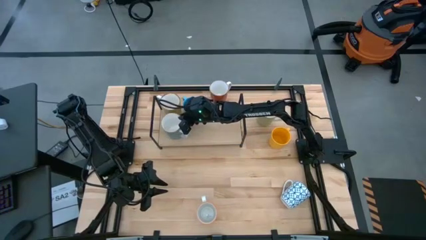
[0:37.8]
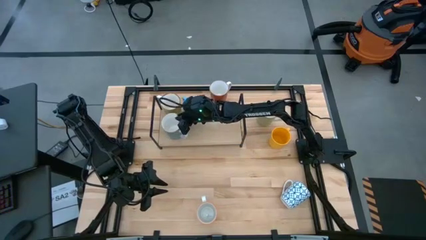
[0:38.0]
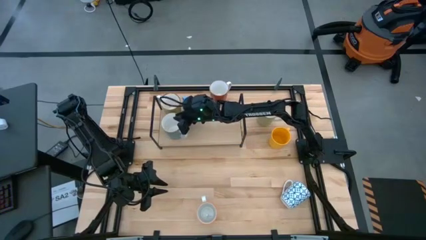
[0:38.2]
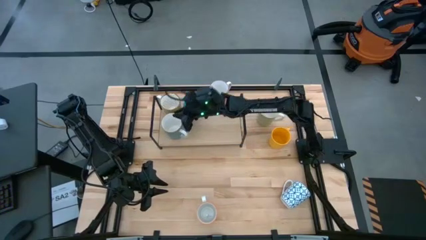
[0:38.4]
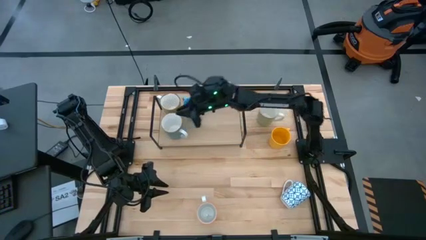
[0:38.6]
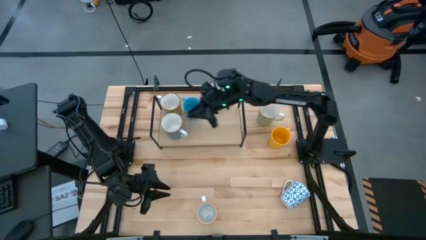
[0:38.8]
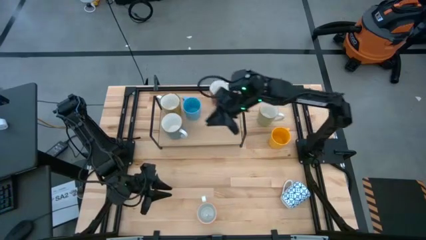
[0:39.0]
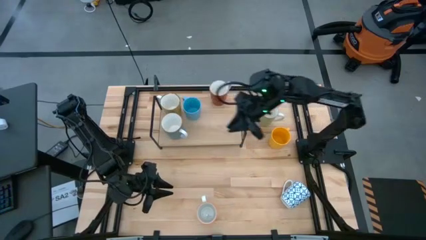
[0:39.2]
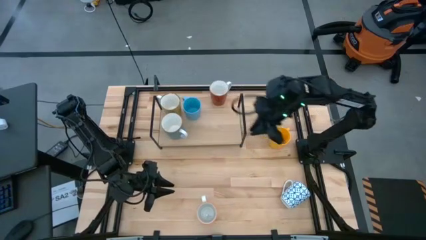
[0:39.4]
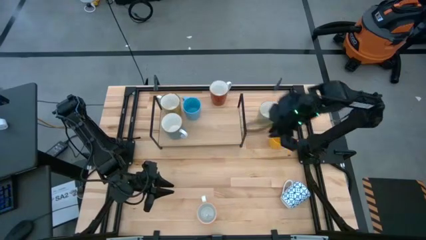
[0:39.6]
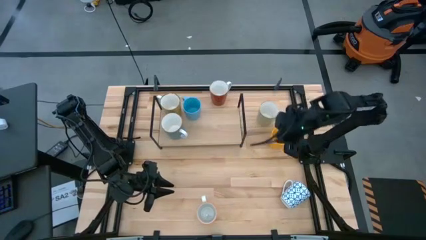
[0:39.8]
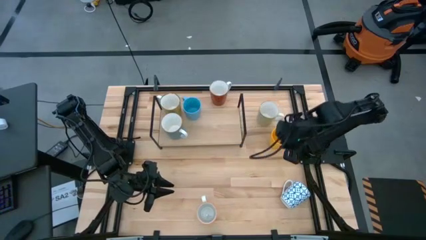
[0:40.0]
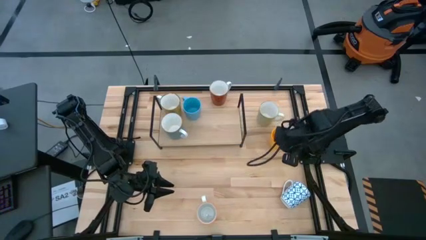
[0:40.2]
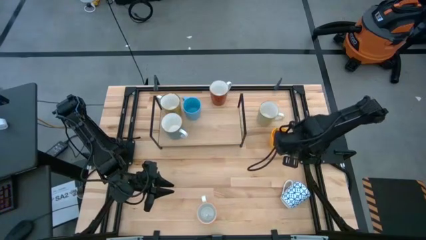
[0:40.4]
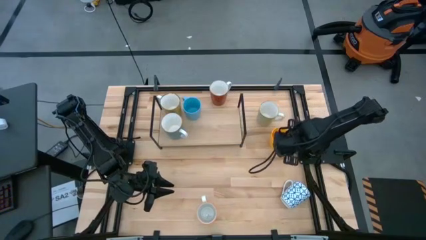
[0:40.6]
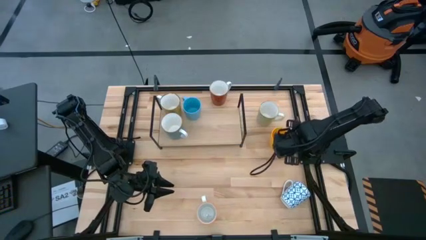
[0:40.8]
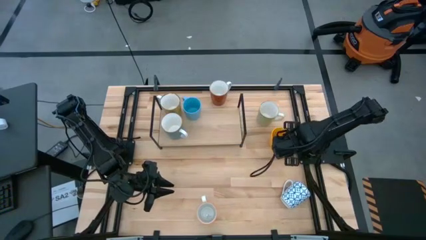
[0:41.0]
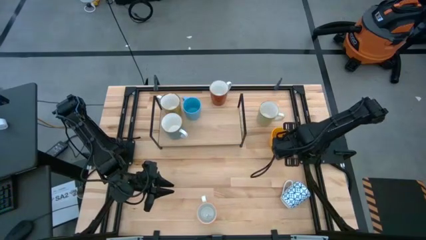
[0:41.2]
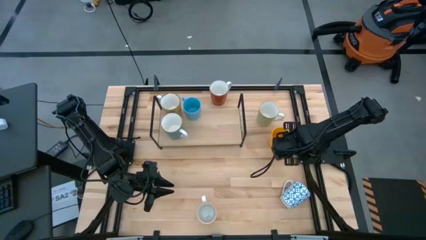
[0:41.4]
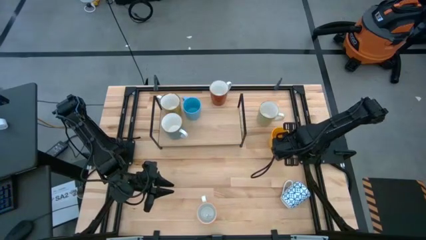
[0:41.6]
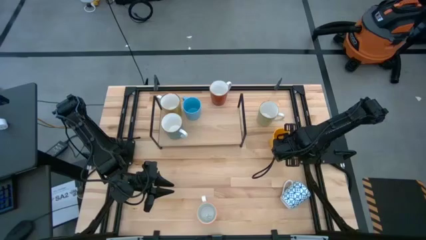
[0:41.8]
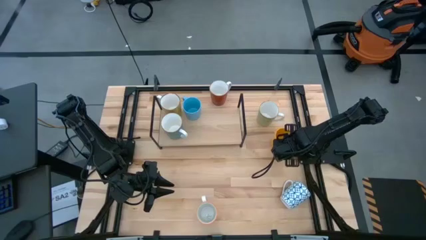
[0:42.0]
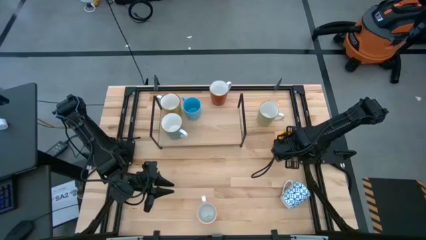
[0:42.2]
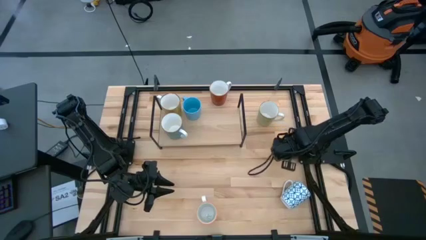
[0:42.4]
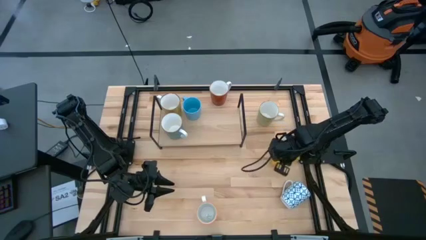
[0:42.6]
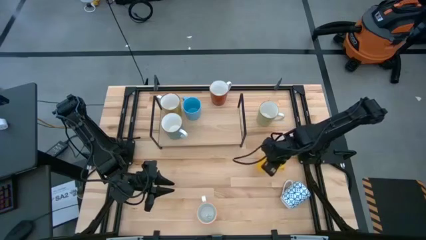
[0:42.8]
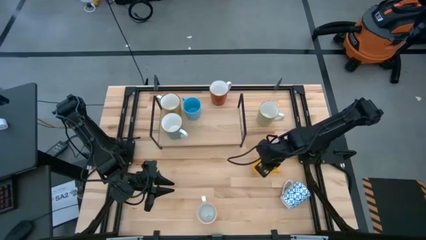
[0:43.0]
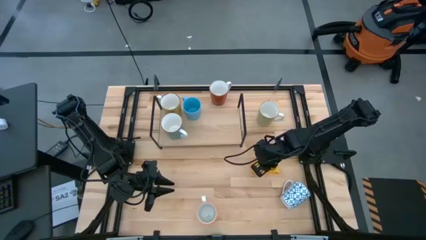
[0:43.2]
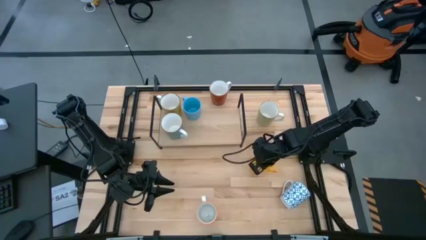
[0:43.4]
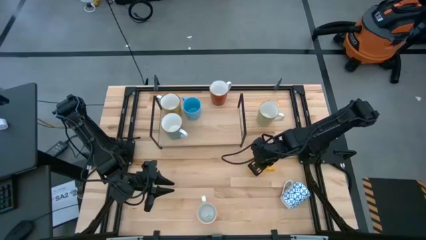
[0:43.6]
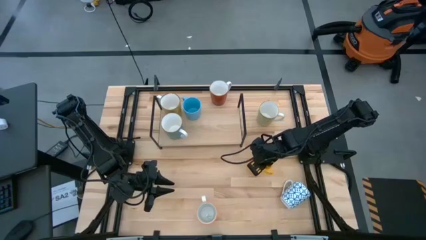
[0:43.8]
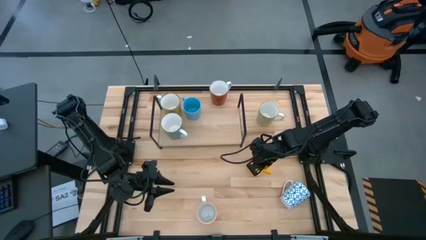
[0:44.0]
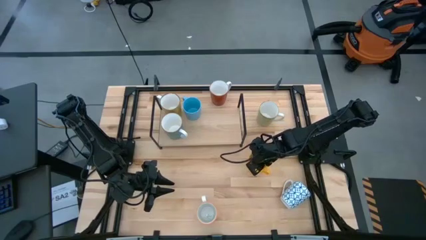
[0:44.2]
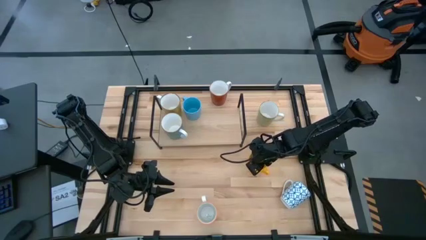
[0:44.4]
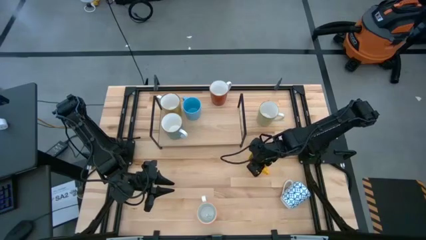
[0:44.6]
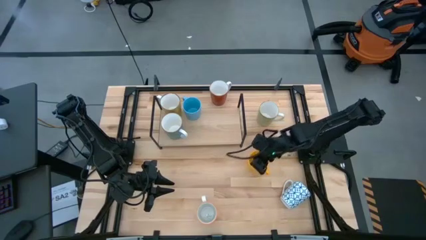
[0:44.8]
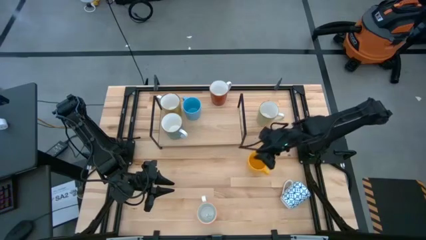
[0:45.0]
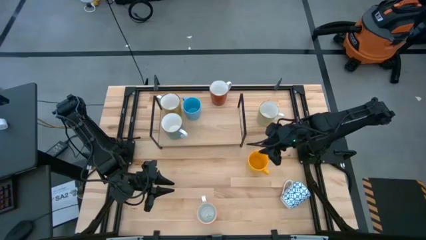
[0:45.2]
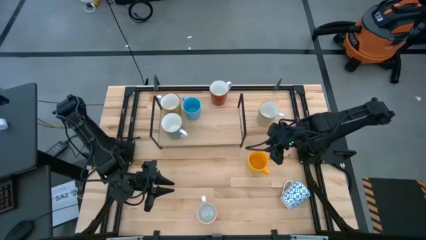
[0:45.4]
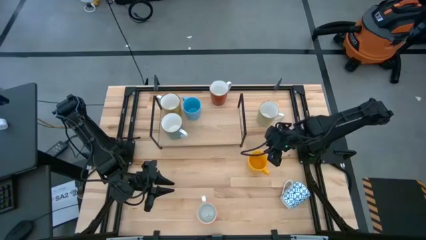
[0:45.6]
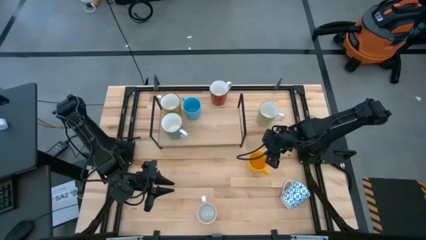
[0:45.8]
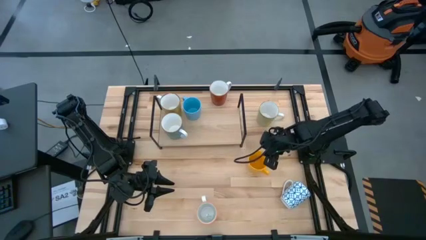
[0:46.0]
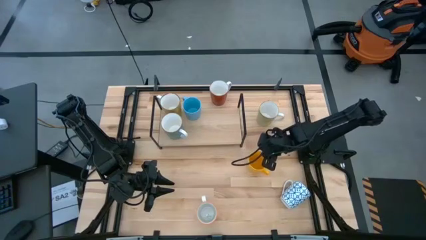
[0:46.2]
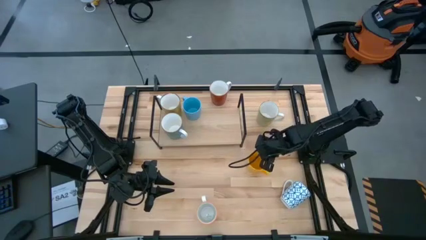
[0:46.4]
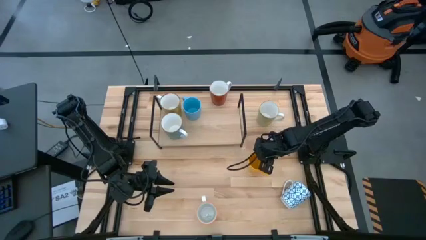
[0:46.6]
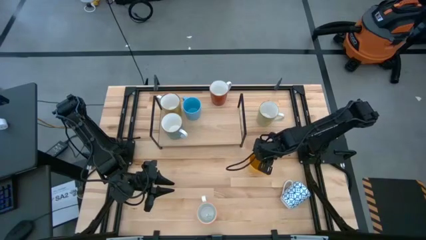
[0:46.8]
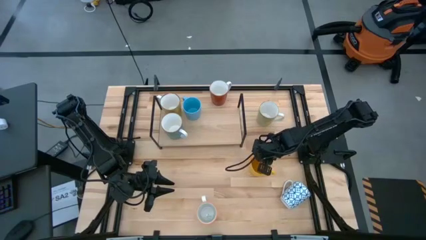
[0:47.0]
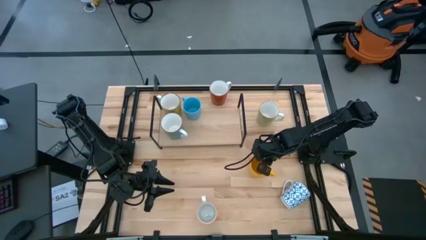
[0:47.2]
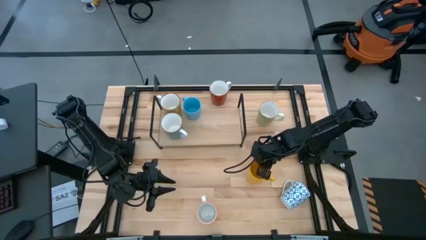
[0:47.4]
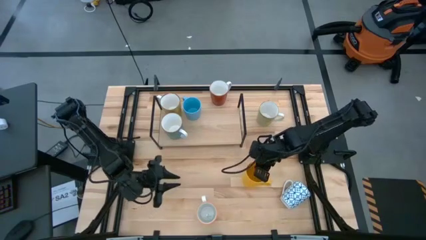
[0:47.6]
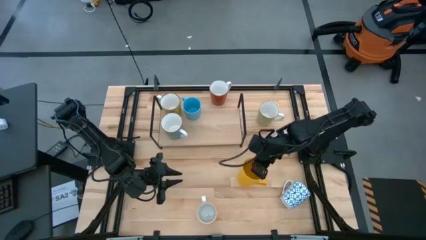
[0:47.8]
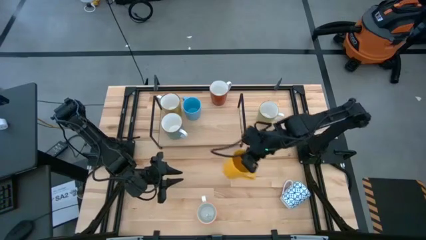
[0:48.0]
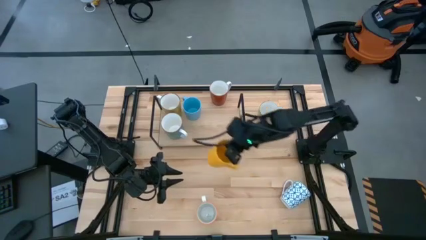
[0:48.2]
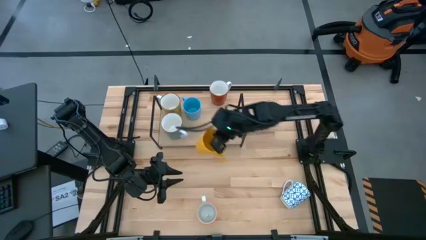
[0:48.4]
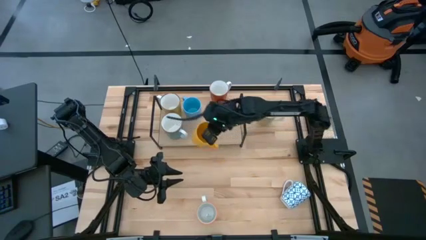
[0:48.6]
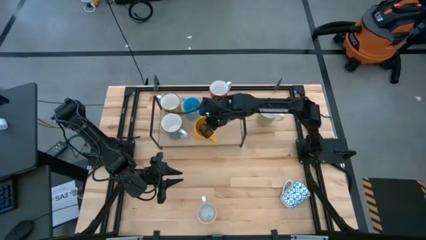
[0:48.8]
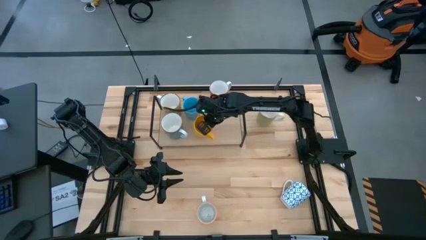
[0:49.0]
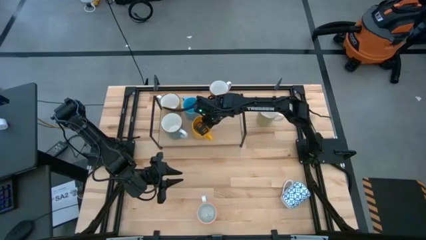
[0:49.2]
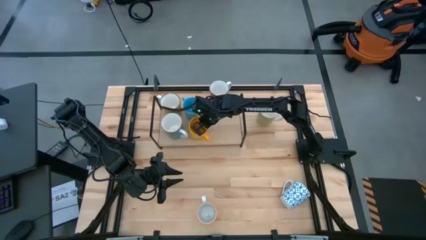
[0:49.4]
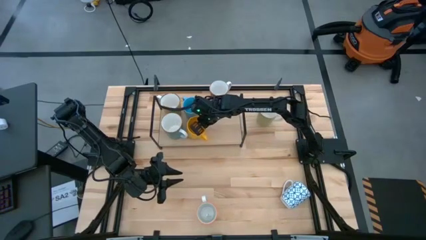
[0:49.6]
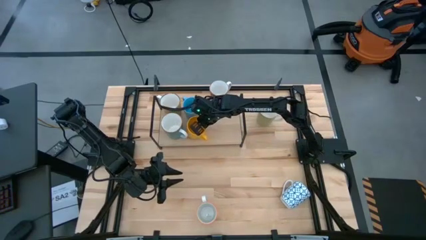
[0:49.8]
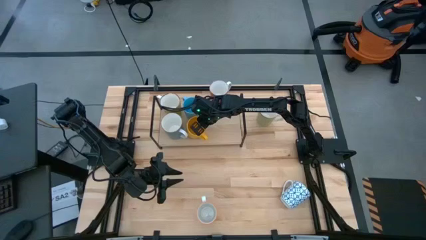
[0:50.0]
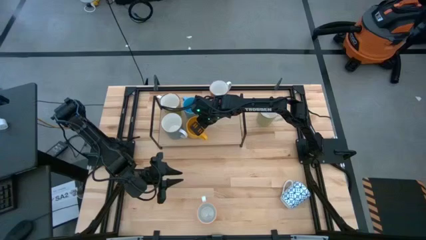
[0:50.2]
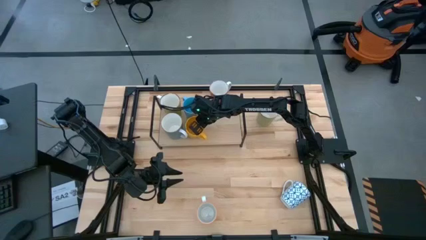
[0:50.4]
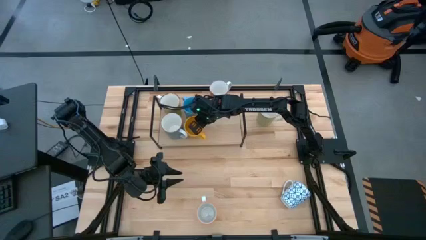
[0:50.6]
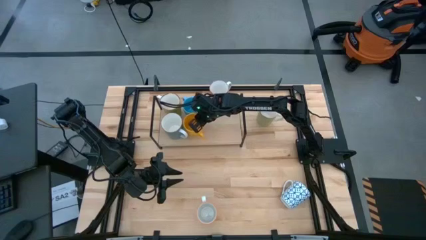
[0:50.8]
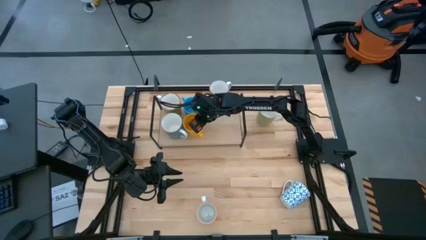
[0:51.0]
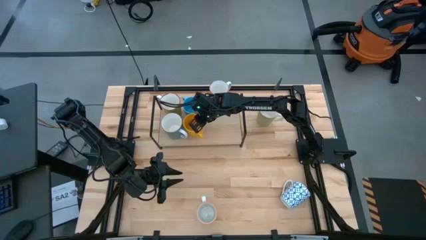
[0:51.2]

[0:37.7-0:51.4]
Task: Place coffee mugs
Put the yellow mug on the shelf
